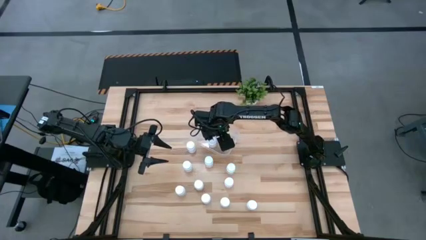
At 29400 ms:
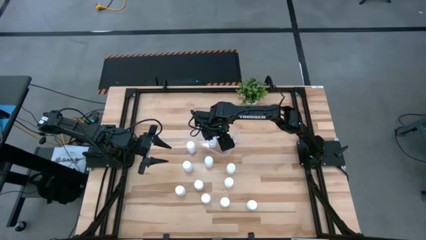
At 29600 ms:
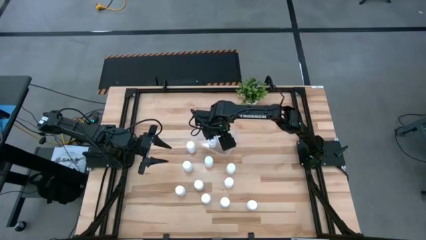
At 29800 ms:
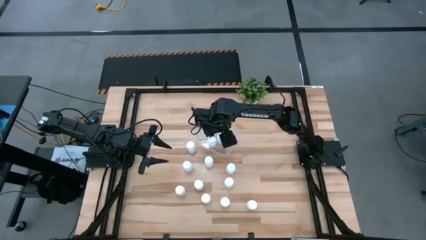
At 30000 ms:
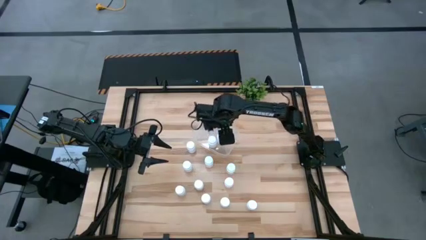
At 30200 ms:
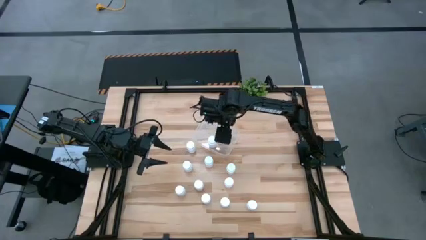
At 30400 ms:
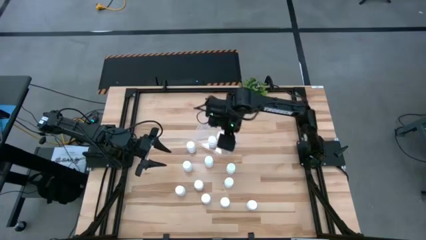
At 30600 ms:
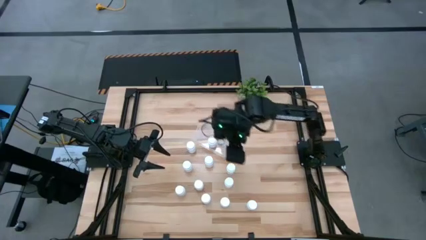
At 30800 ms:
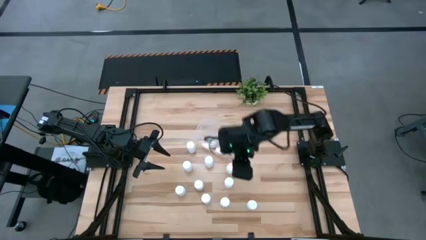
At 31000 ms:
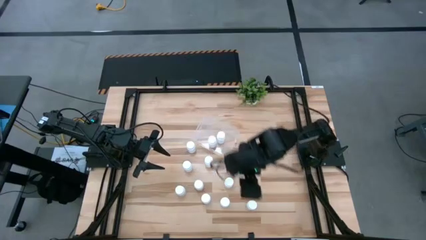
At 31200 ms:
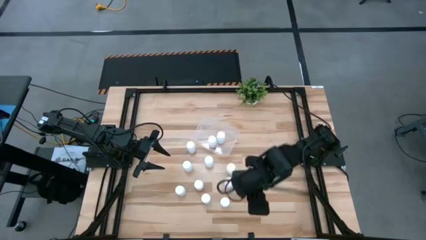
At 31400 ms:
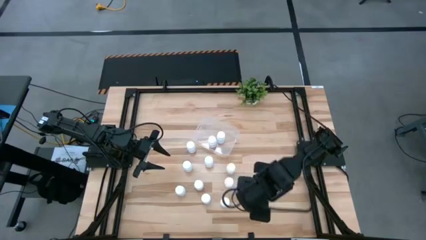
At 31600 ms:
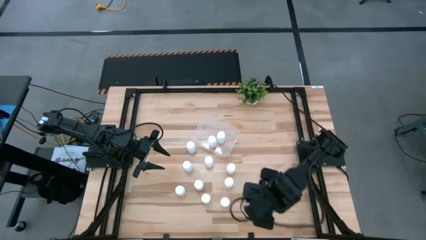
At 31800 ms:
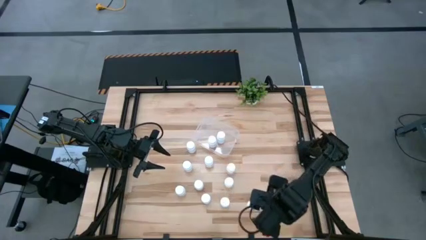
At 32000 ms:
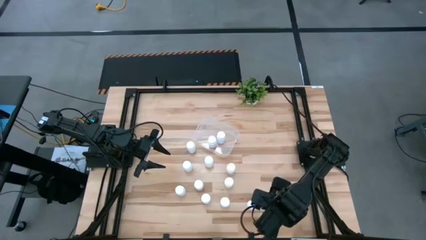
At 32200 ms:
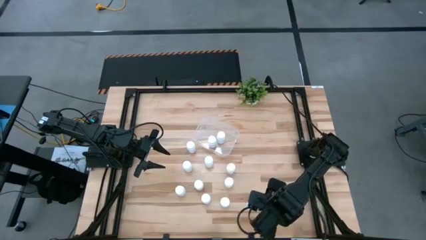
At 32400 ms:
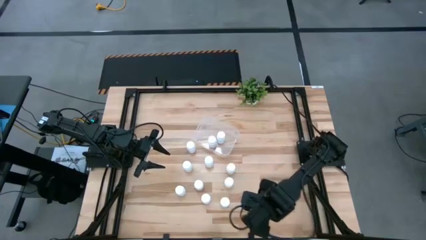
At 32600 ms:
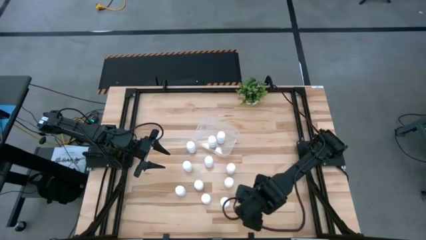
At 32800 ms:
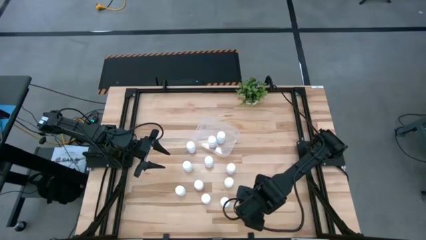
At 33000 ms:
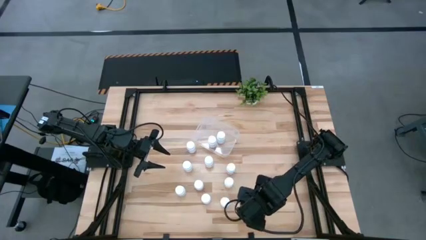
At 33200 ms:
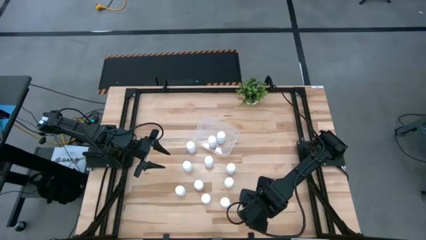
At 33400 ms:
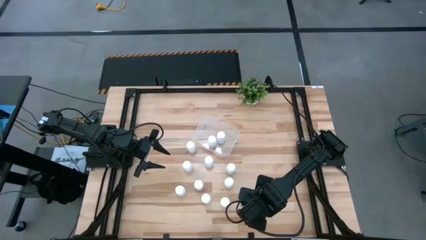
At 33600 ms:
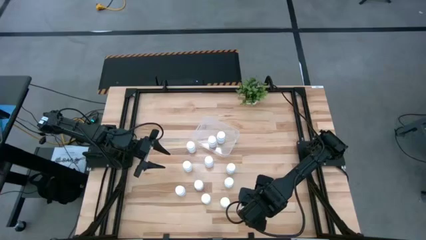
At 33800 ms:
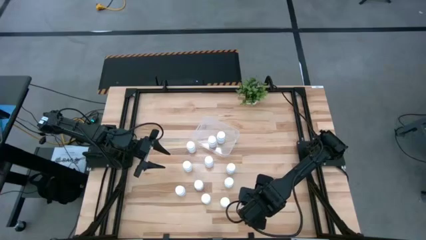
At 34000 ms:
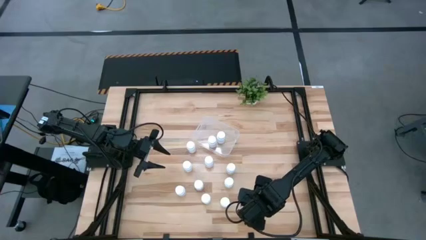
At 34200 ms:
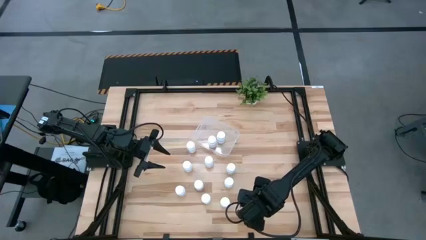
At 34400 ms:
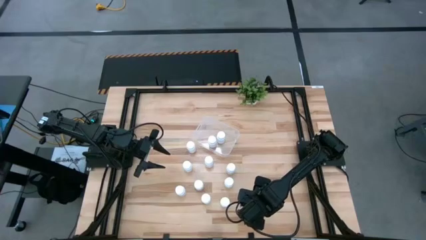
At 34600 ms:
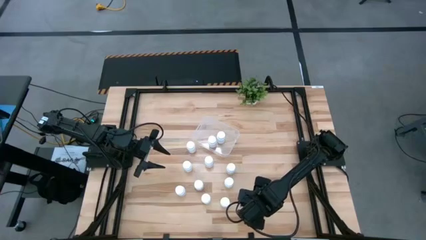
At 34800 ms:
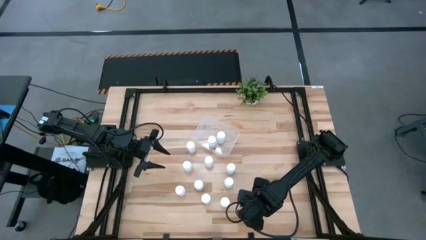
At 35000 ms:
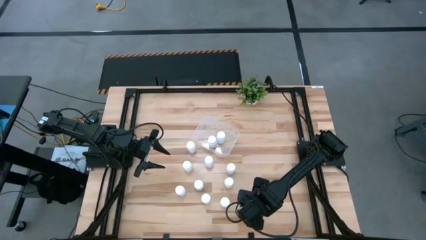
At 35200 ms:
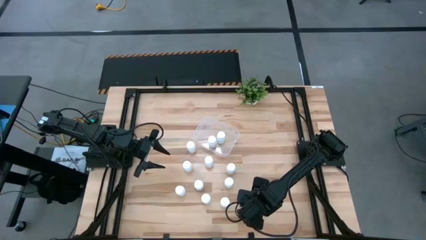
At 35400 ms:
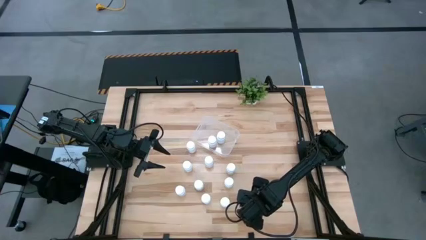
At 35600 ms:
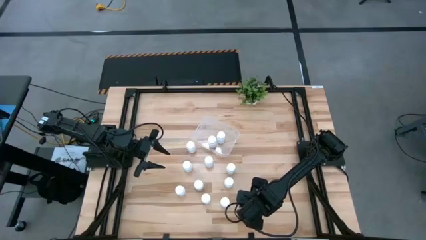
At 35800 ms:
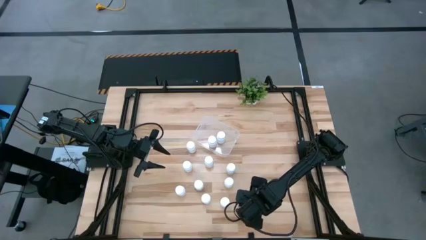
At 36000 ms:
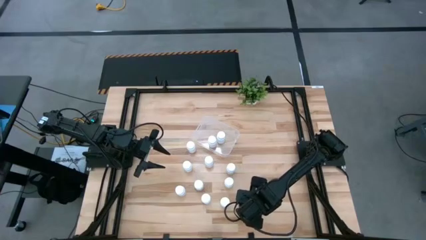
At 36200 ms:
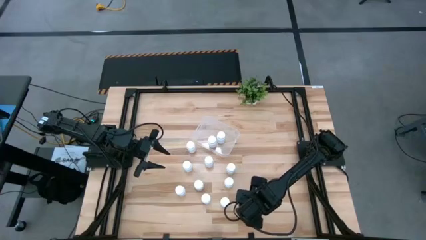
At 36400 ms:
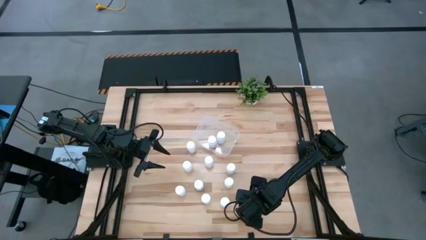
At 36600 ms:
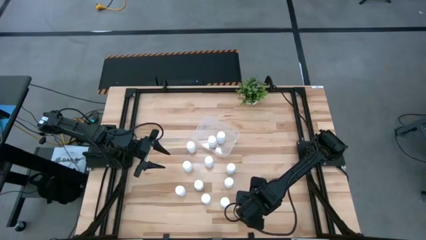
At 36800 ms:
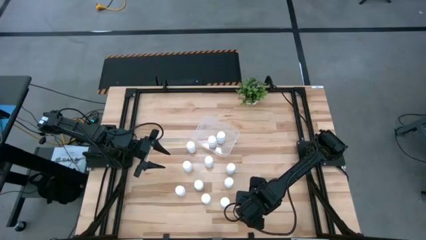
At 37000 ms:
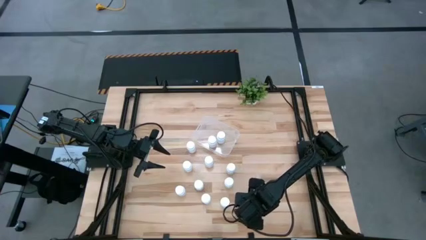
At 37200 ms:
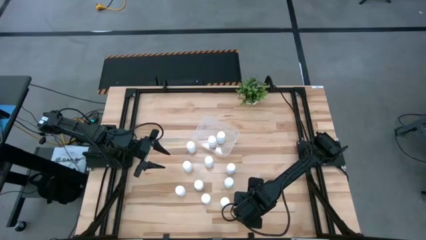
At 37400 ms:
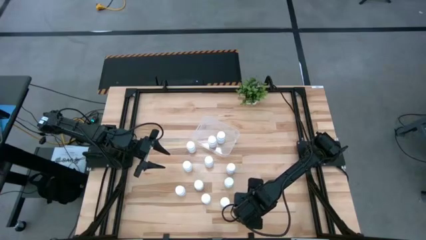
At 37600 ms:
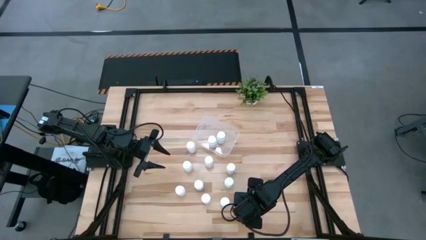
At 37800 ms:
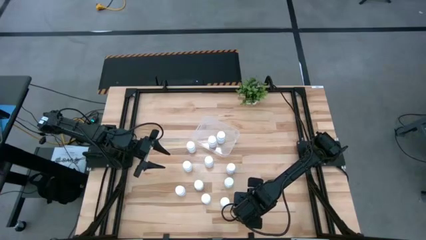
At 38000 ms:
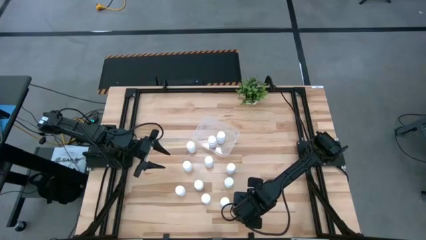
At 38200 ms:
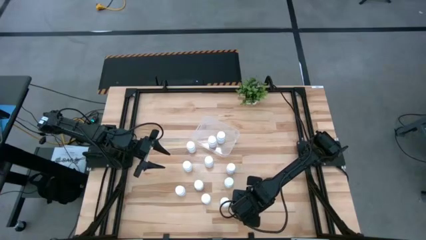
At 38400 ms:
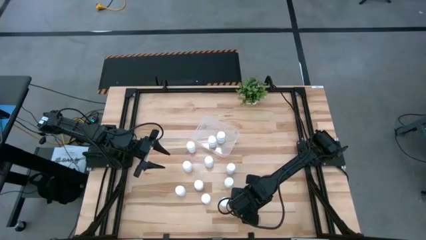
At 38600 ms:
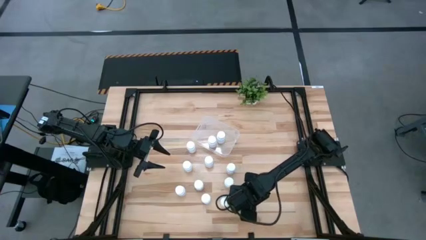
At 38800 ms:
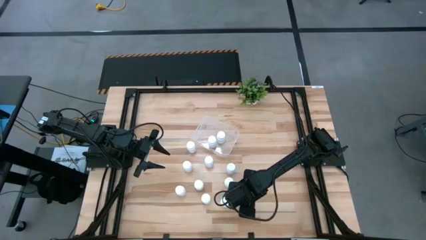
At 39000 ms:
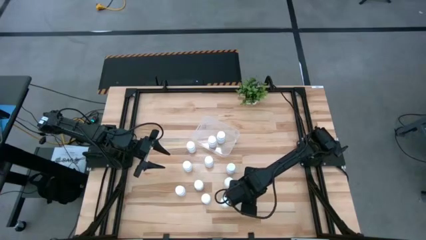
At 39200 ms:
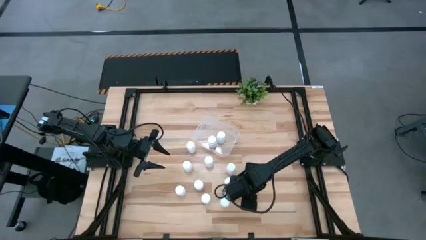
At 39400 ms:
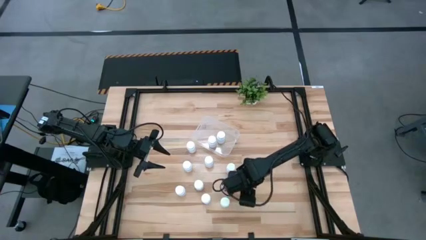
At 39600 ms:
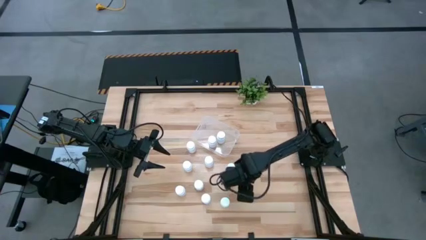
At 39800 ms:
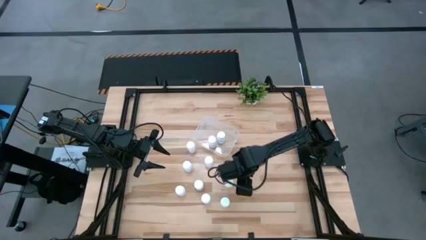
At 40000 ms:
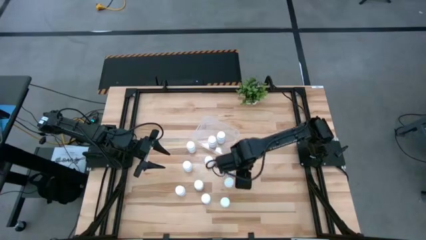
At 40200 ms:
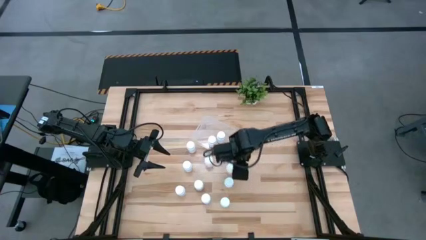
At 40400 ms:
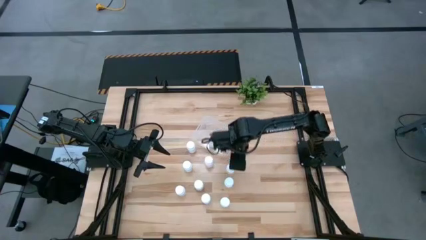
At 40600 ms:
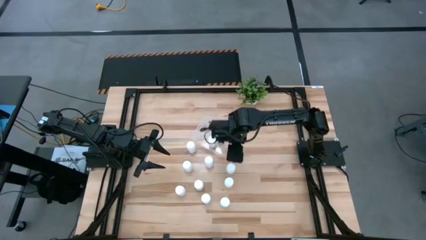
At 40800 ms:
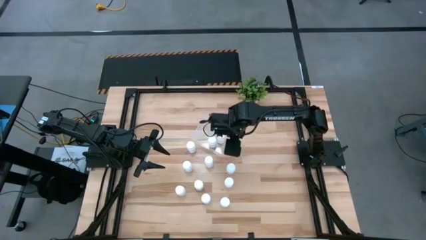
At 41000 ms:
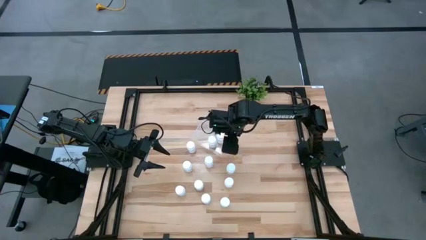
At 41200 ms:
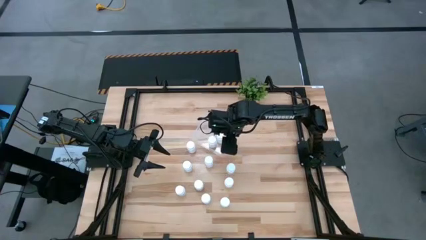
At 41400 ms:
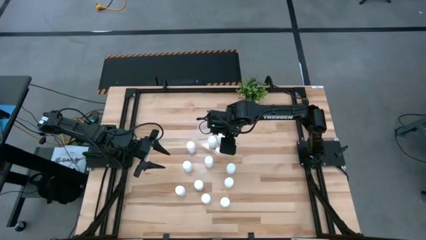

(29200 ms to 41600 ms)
Task: Pick and place pill bottles into a basket
Put the pill bottle into the bin

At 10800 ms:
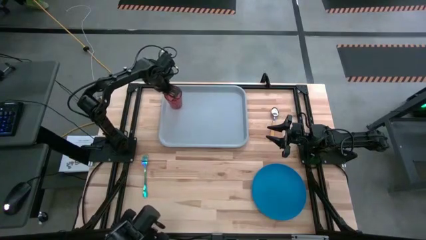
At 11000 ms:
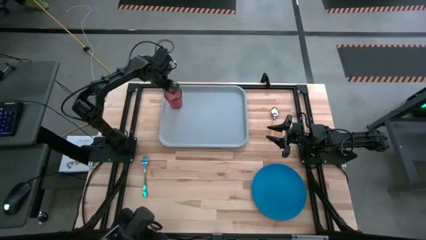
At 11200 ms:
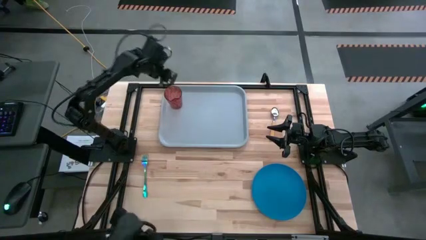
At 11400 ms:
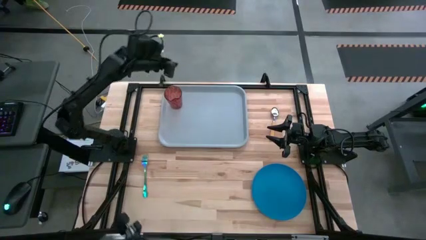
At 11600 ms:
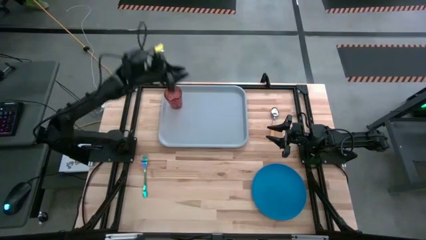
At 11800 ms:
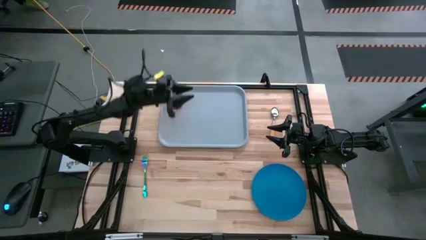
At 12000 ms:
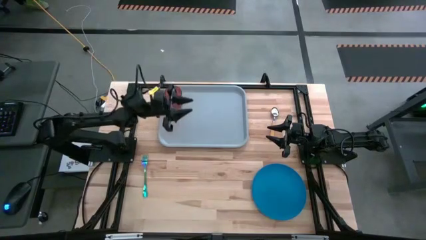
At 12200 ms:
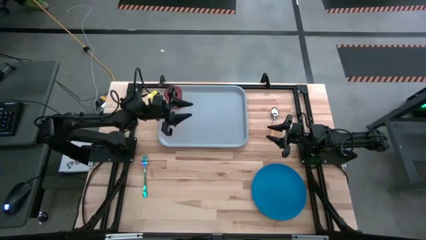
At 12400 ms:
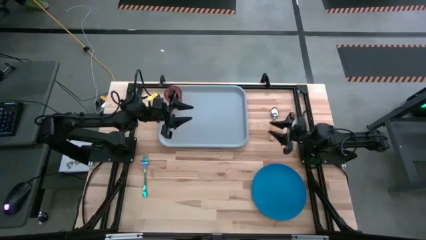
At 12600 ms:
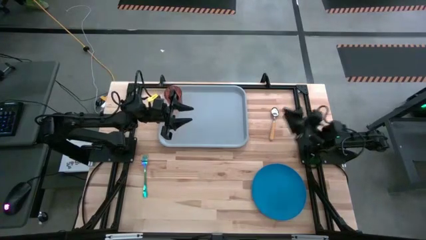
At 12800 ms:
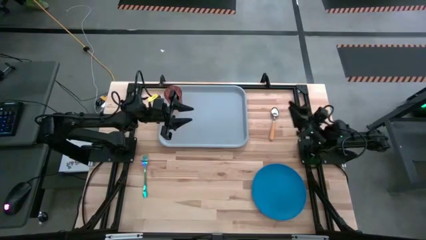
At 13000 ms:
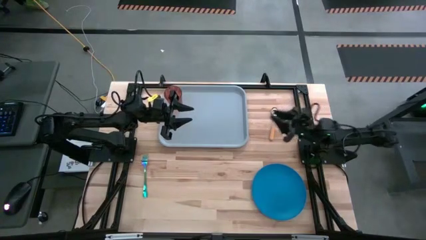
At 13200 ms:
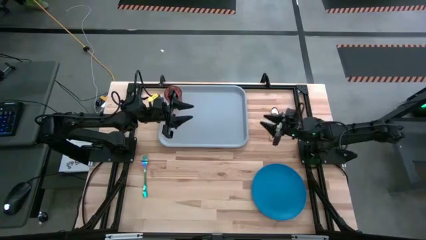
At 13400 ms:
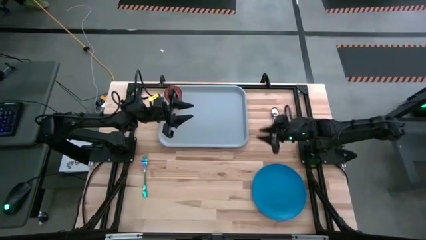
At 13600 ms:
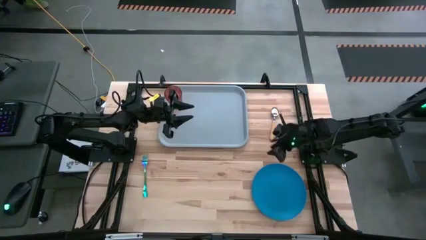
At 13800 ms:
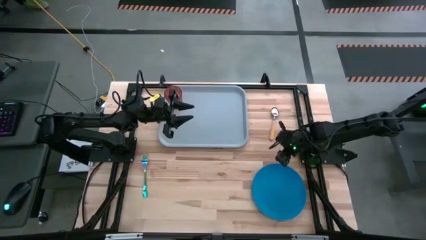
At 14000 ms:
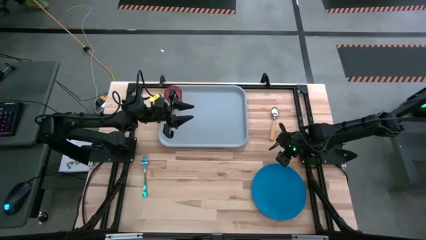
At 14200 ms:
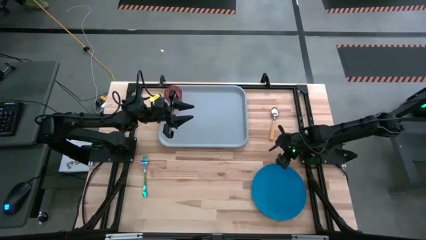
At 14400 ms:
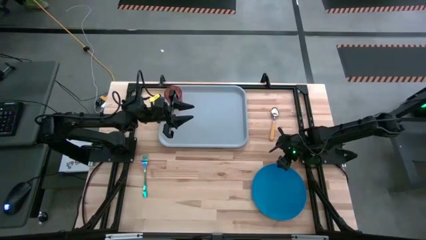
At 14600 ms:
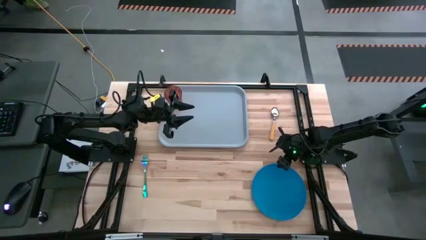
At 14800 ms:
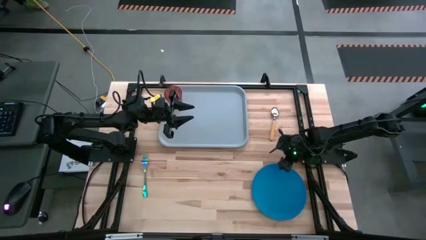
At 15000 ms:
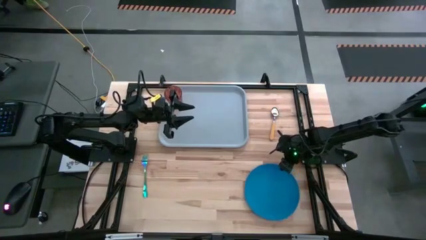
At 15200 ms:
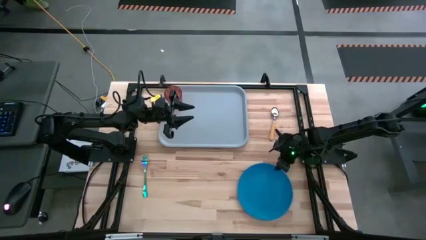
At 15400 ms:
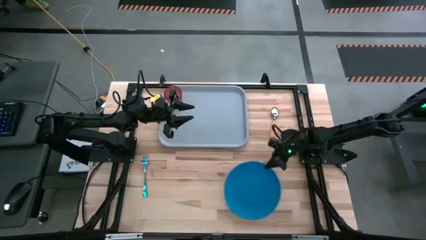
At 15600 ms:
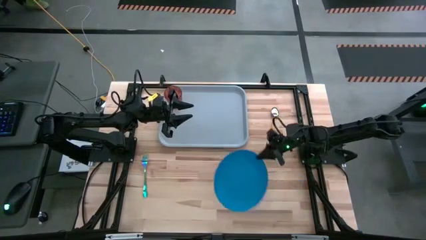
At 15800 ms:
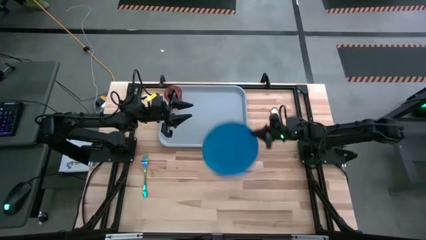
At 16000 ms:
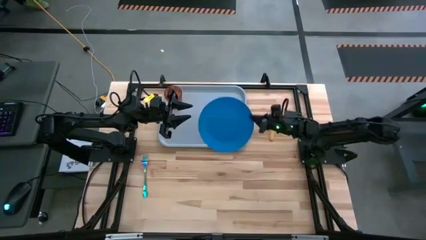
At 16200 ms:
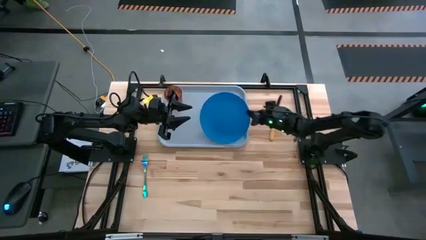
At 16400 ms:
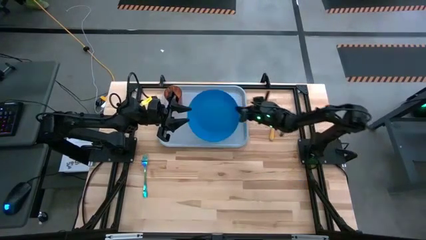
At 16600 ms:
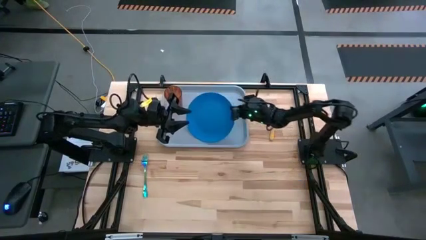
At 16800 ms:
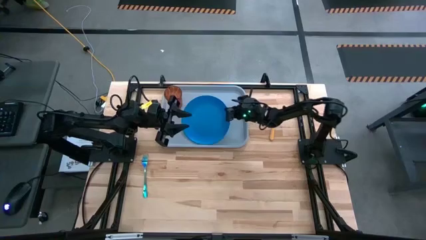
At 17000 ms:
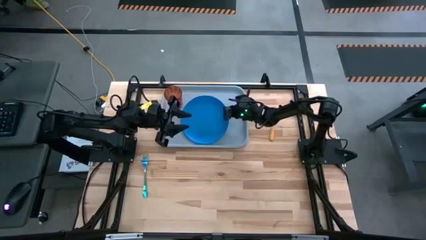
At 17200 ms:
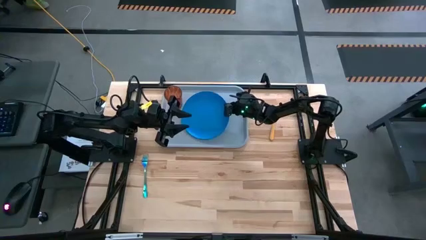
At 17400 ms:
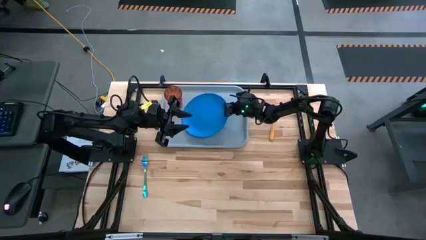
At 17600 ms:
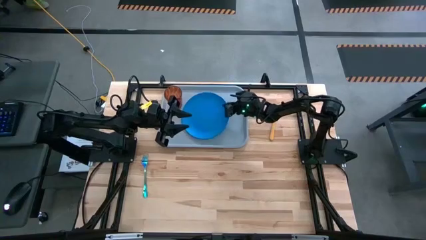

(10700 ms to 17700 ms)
Task: Pick and place plate/cup/fork/spoon on tray
Put the blue plate on the serving tray to the bottom right of the brown cup
